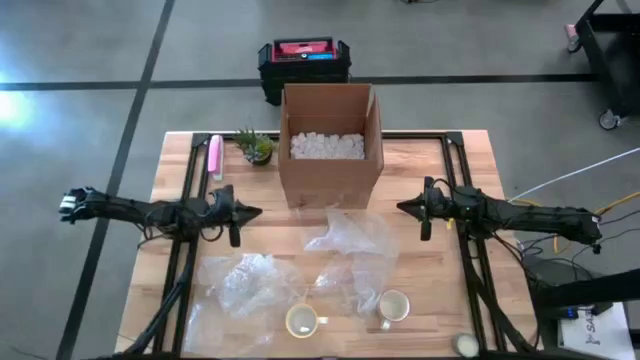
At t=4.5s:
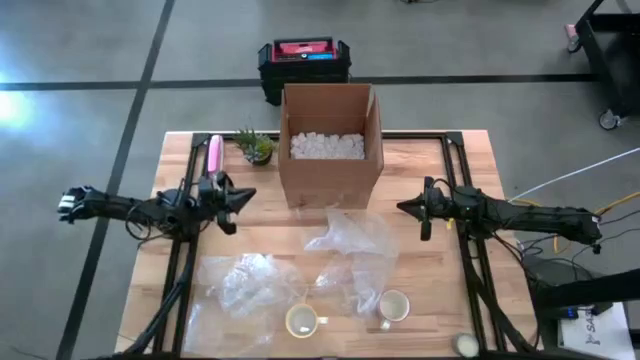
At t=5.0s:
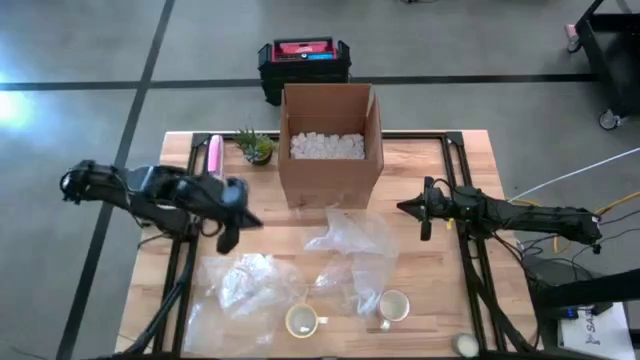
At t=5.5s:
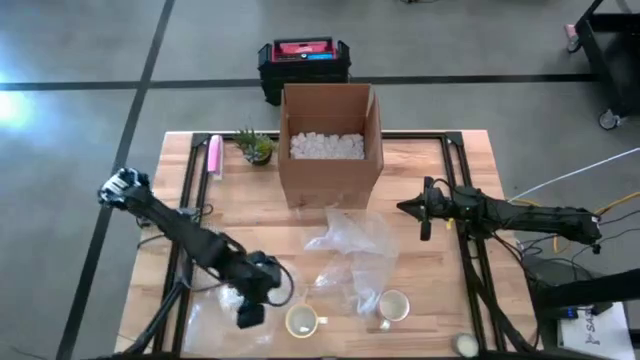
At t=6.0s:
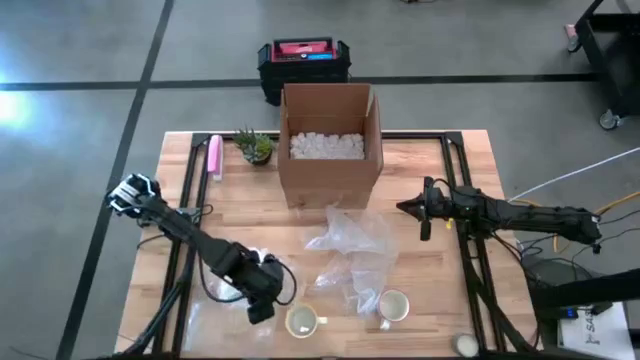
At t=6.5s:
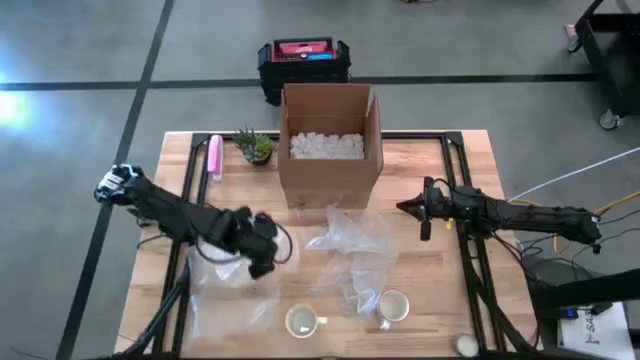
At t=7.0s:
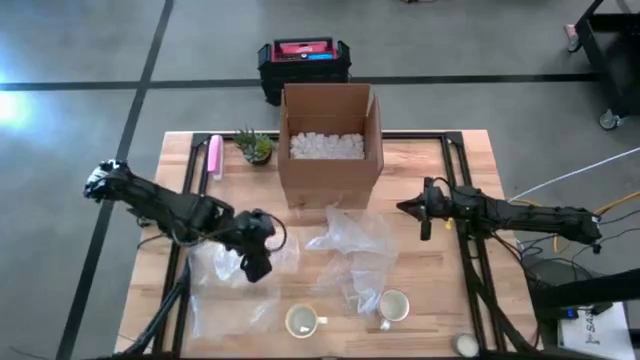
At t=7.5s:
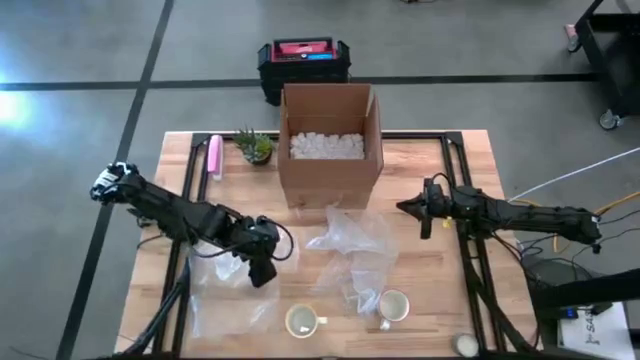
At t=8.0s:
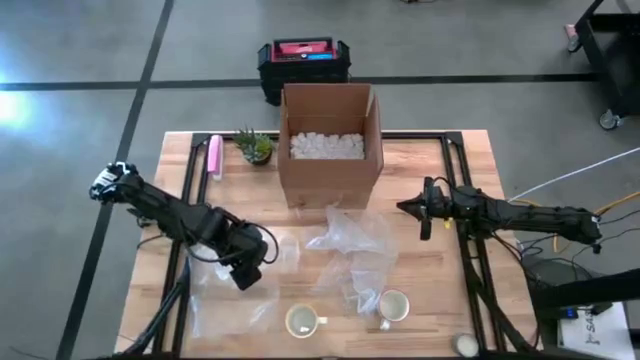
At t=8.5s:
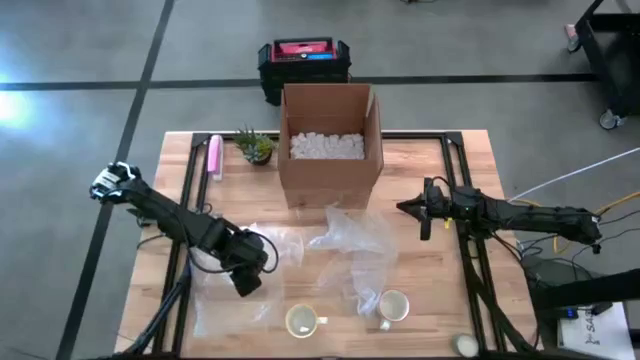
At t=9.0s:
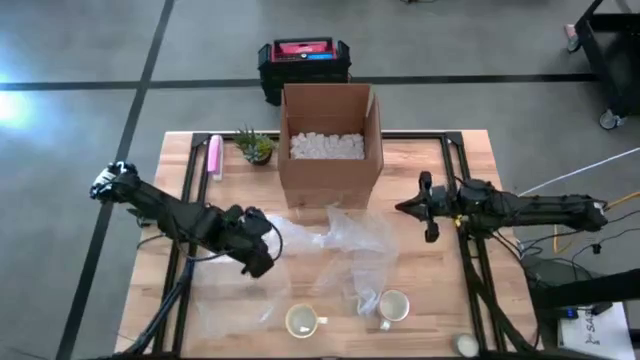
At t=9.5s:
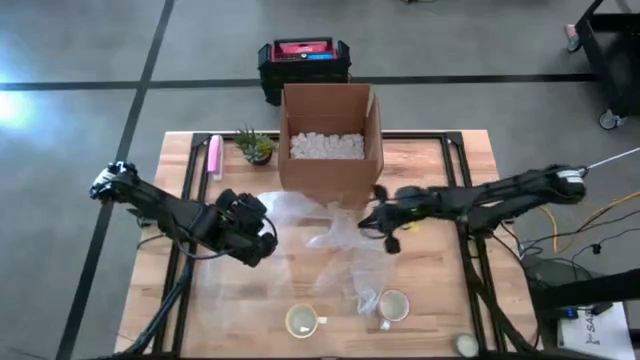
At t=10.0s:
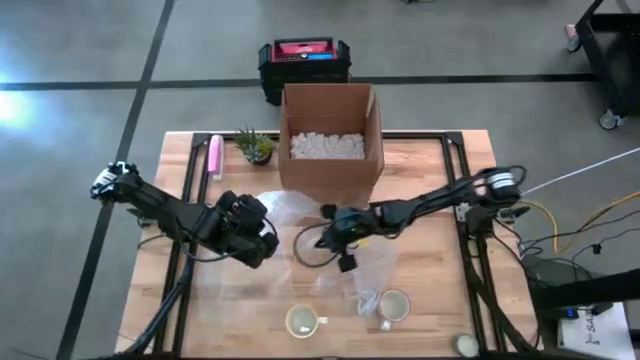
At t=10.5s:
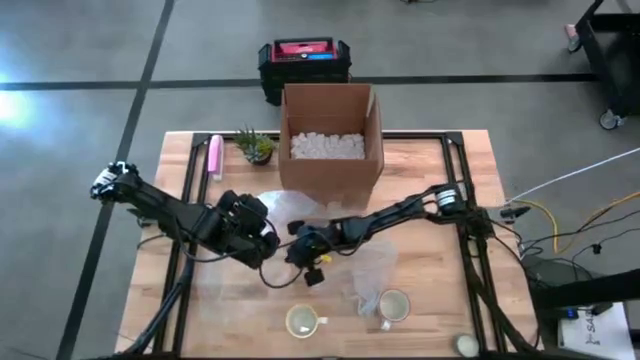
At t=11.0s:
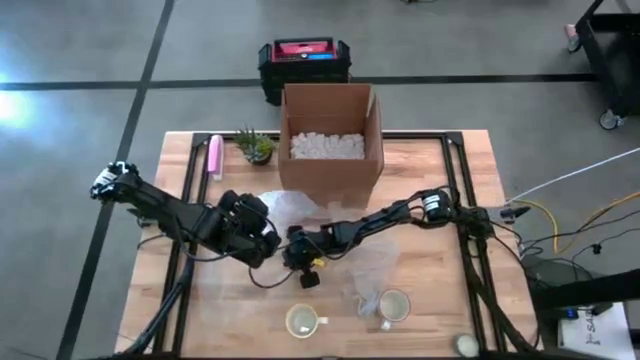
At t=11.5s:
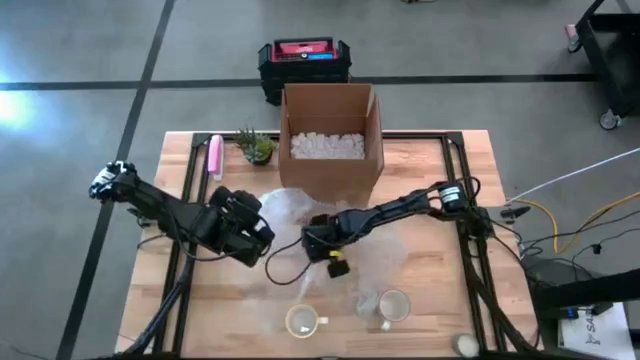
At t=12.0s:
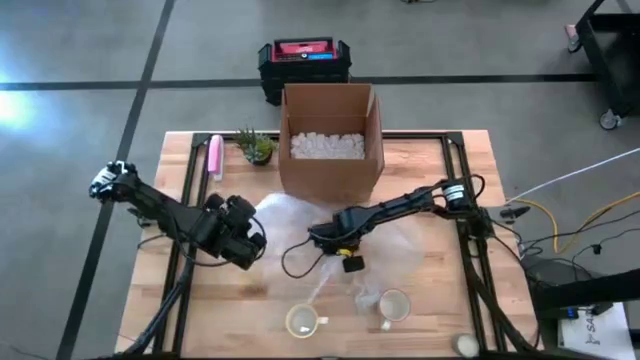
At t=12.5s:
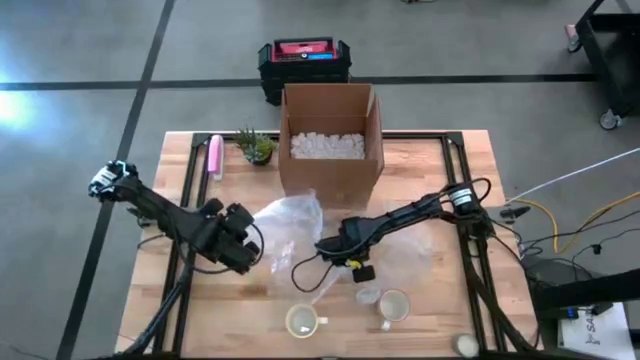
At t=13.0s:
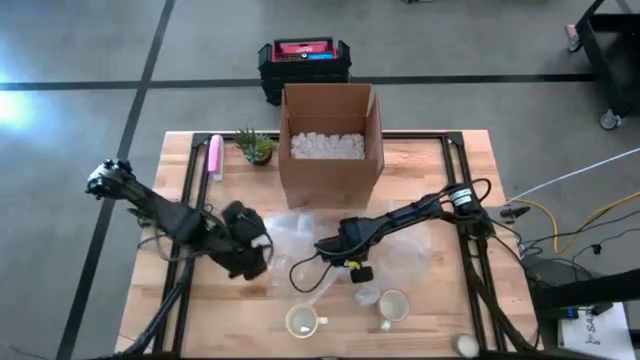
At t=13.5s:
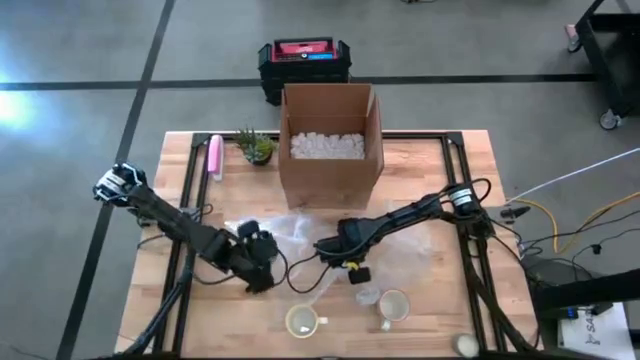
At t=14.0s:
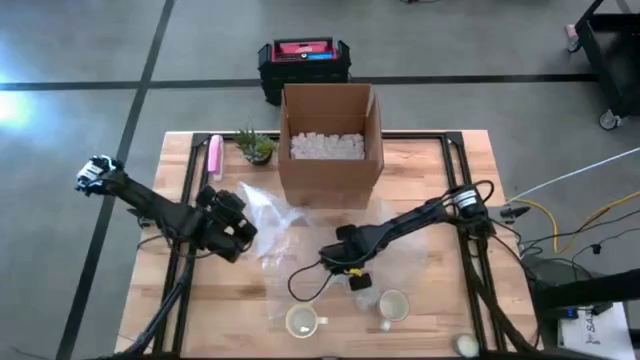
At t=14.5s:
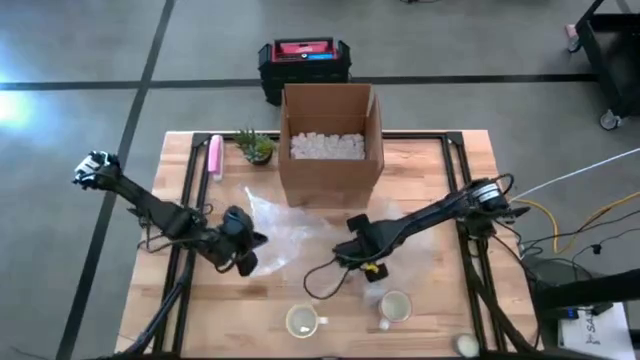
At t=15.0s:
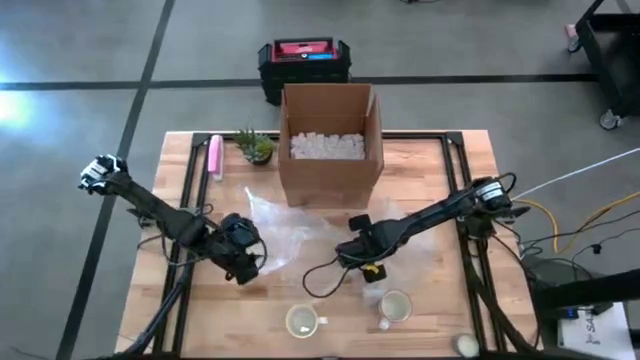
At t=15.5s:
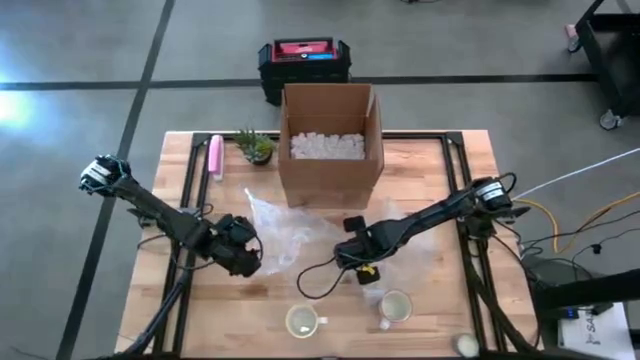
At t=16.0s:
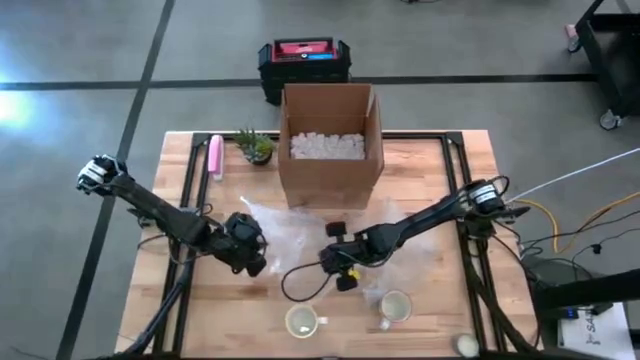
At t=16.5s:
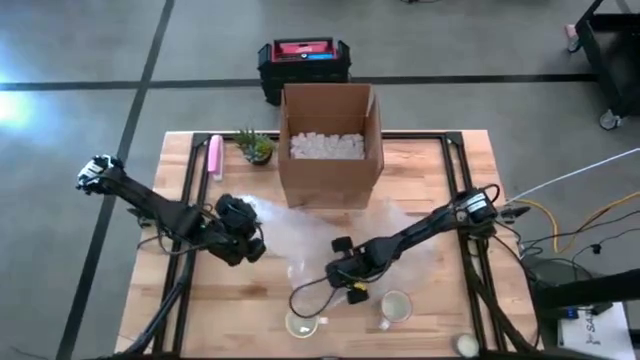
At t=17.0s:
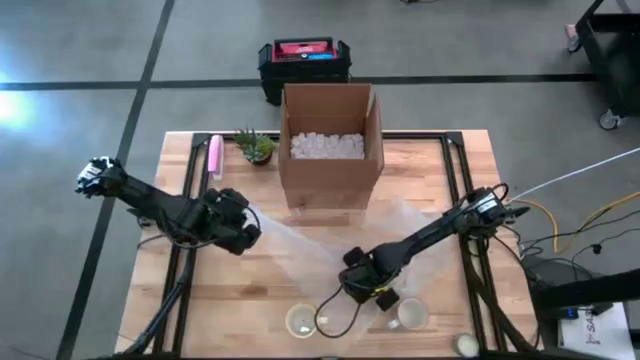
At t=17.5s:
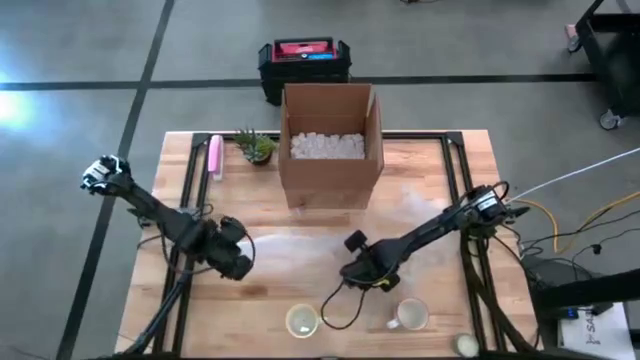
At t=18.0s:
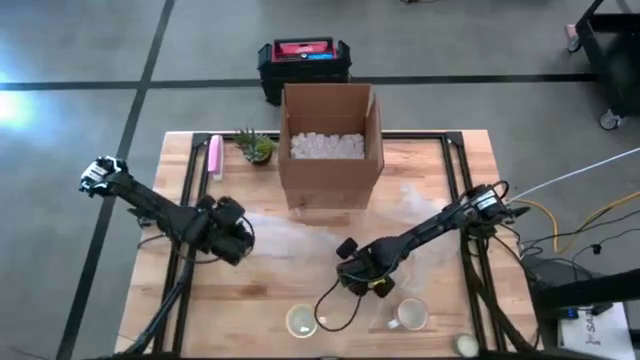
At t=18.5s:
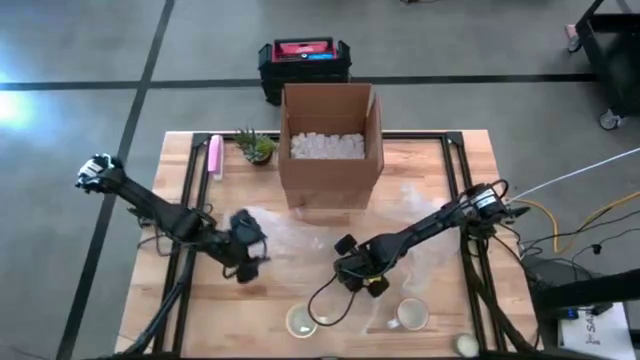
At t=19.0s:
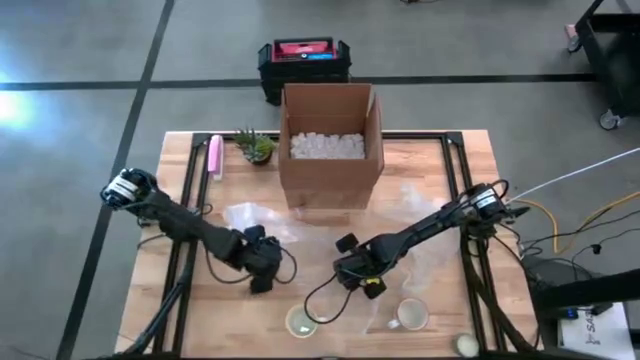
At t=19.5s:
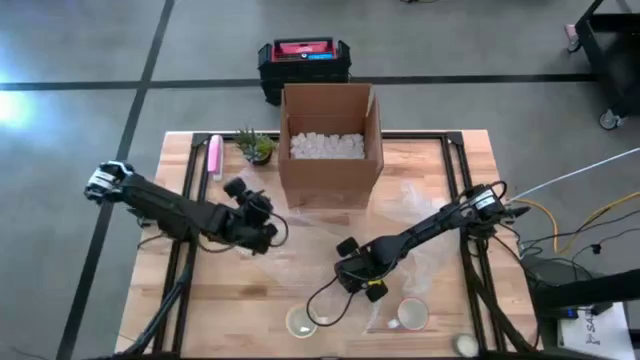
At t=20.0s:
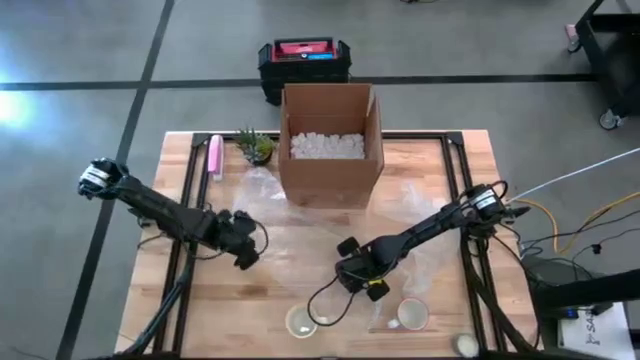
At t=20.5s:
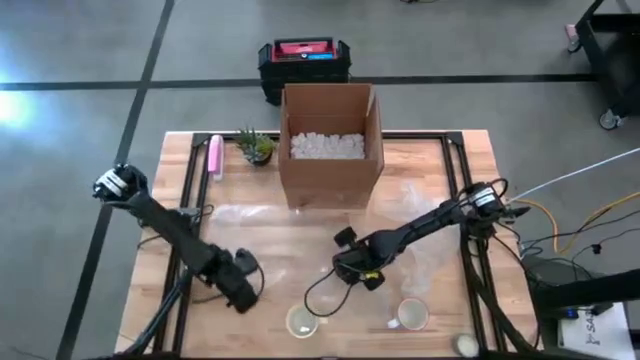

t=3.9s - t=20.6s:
Task: wrap mug
Prepare the left bubble wrap

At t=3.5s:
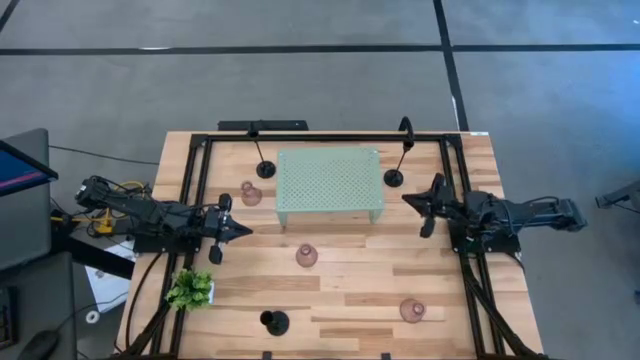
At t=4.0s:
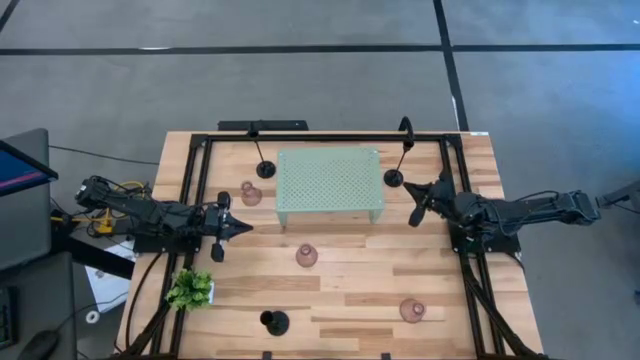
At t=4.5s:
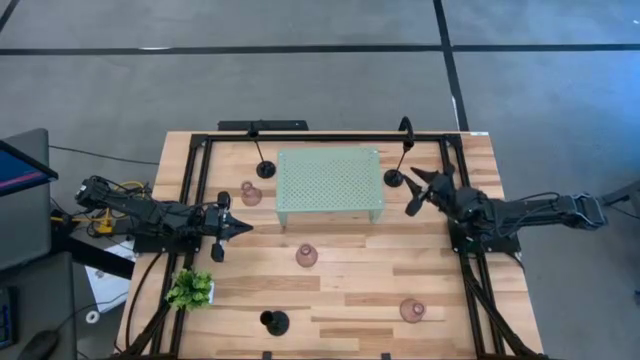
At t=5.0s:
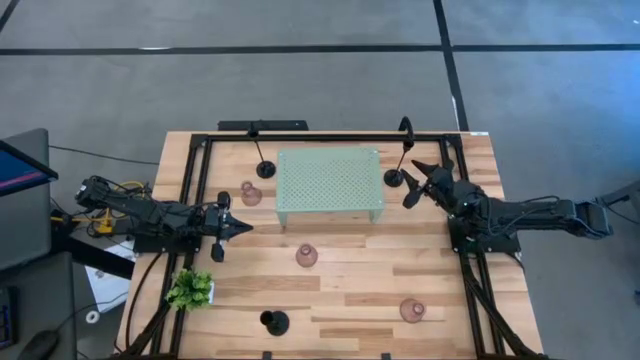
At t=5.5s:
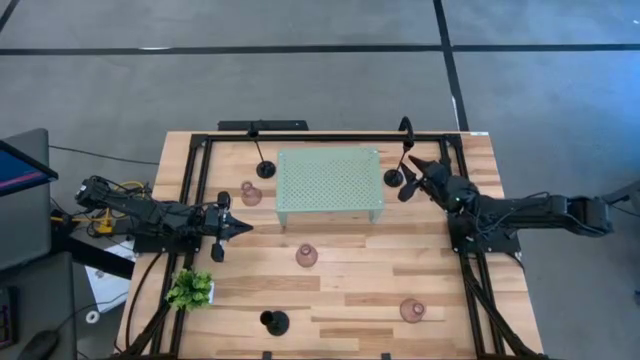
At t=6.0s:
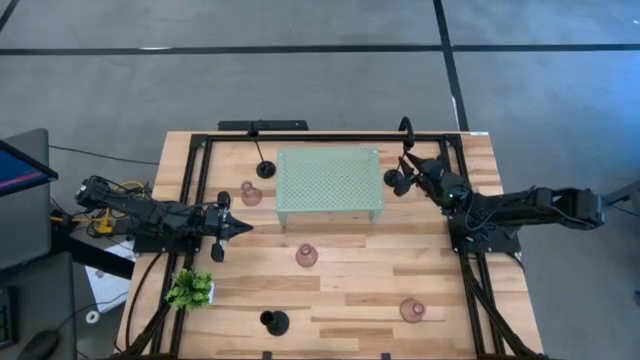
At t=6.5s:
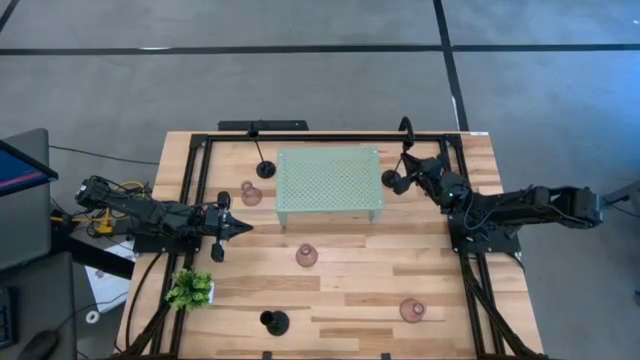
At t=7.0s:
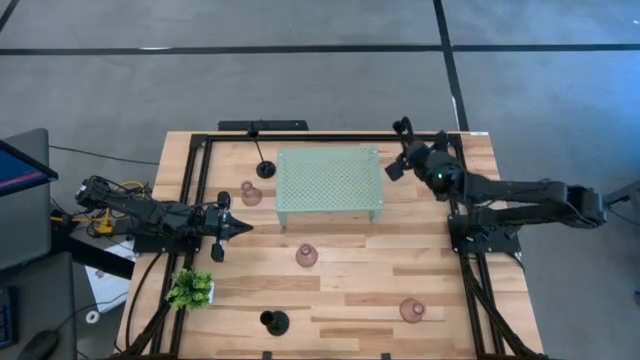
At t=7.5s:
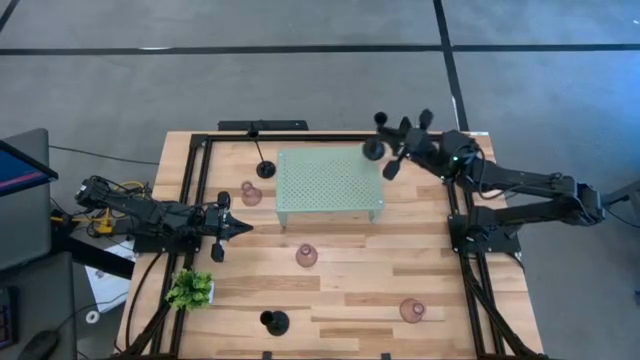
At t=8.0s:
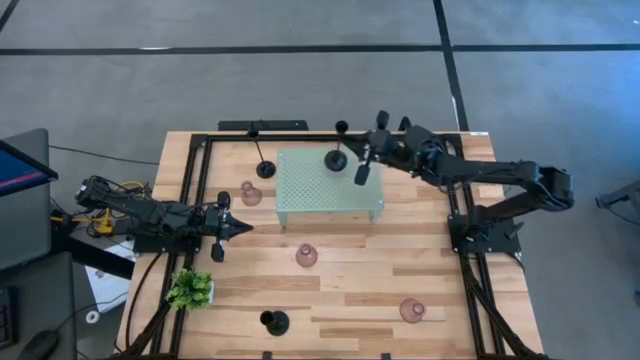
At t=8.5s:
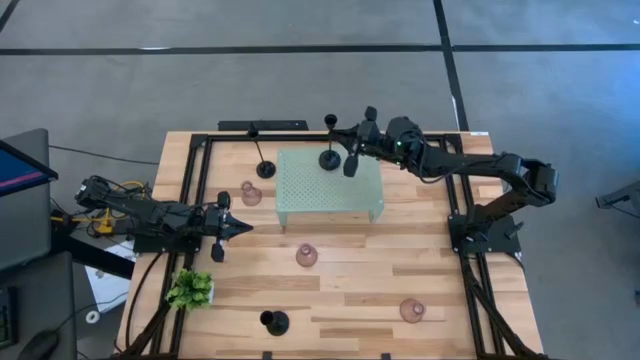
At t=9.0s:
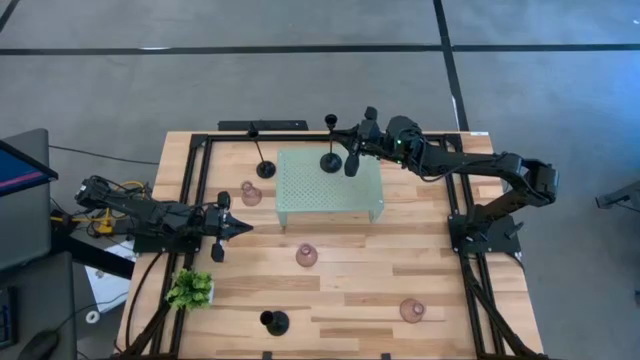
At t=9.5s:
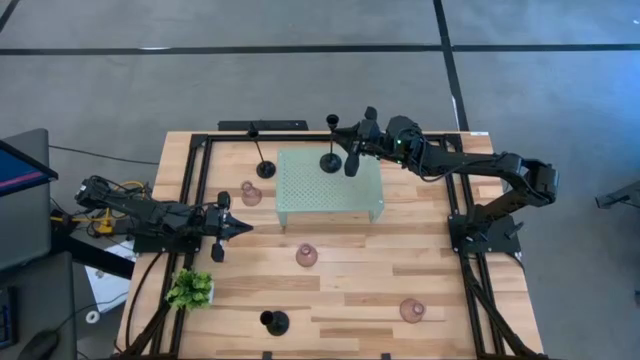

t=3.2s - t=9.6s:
Task: Pick & Place candle stick holders
Put the top right black candle holder on the shelf
